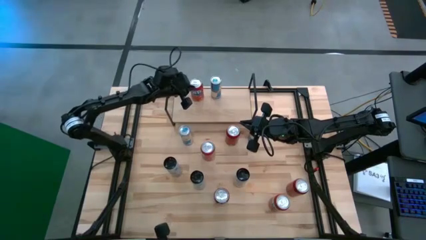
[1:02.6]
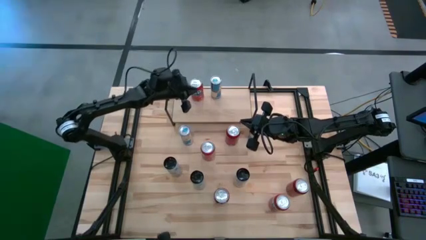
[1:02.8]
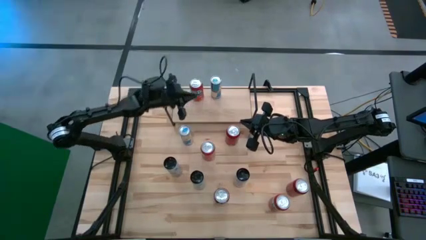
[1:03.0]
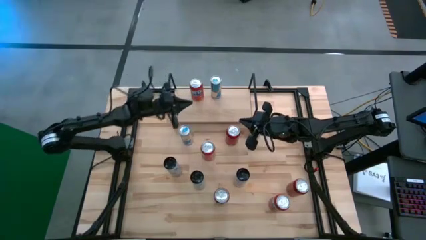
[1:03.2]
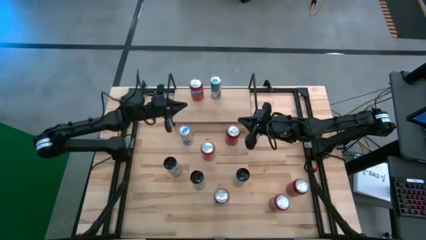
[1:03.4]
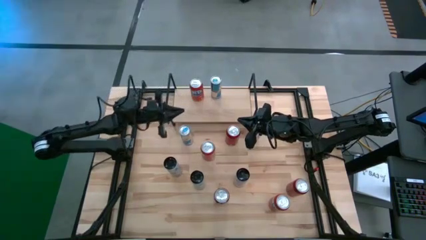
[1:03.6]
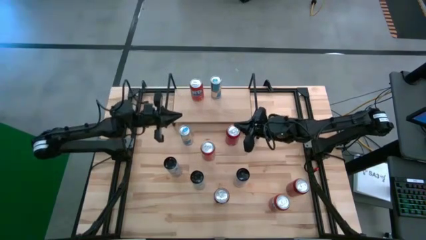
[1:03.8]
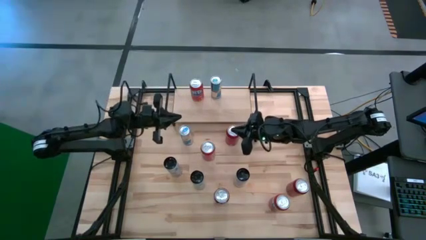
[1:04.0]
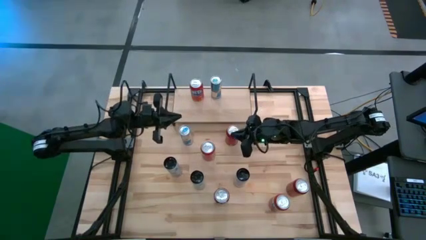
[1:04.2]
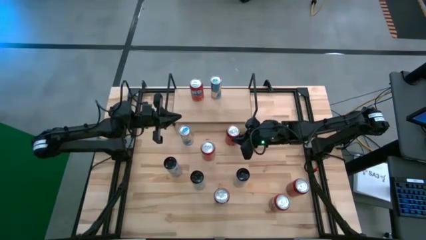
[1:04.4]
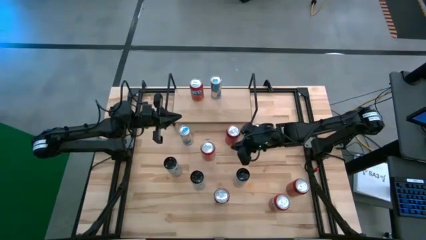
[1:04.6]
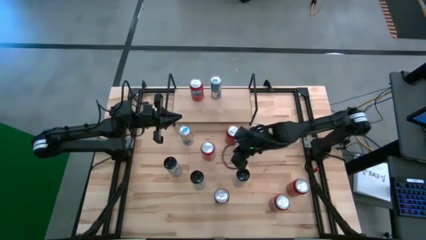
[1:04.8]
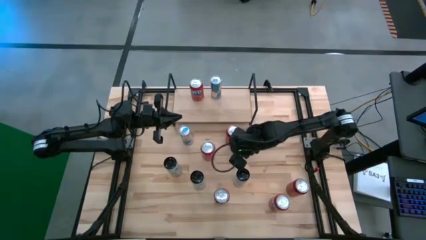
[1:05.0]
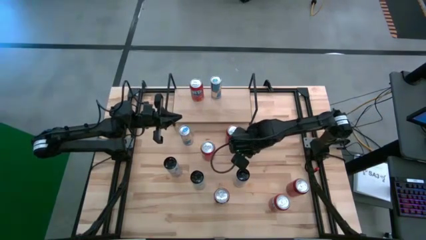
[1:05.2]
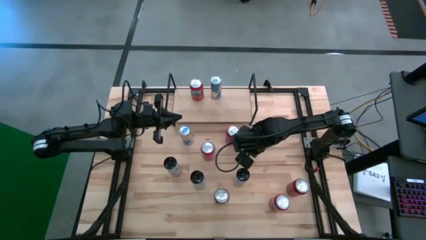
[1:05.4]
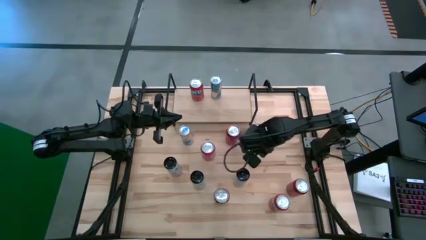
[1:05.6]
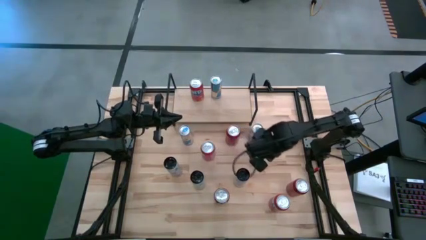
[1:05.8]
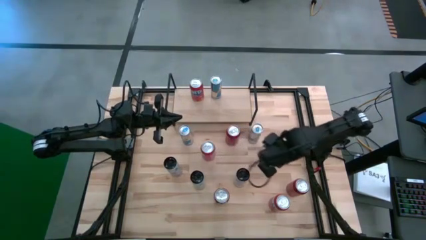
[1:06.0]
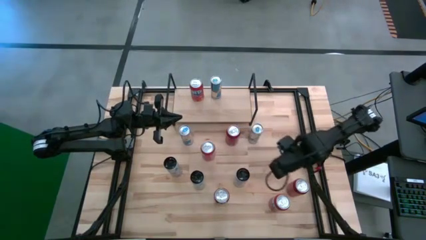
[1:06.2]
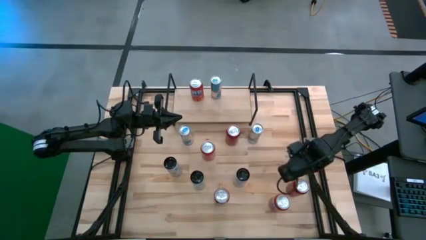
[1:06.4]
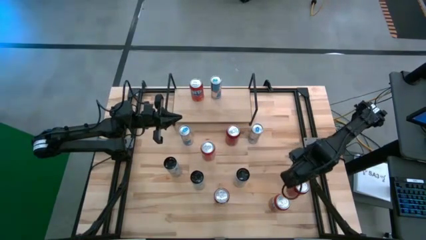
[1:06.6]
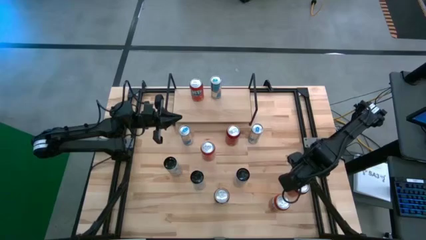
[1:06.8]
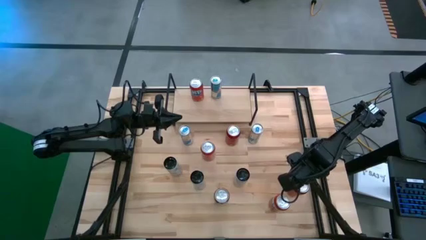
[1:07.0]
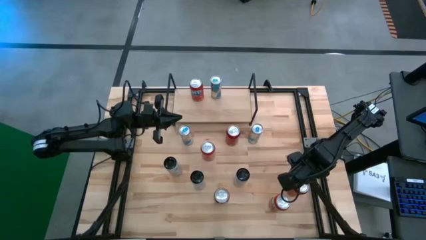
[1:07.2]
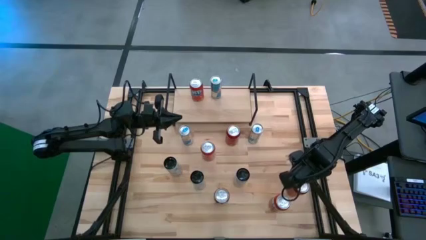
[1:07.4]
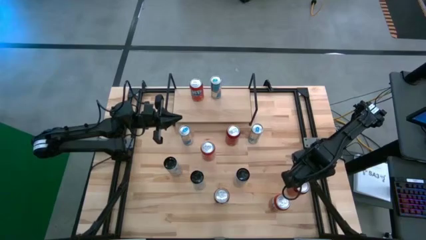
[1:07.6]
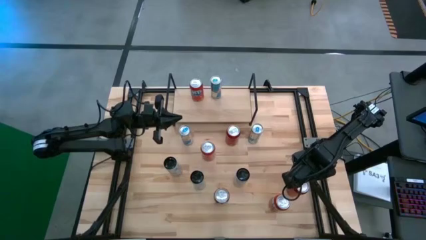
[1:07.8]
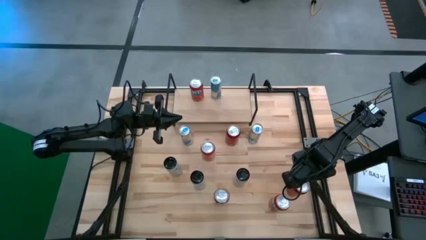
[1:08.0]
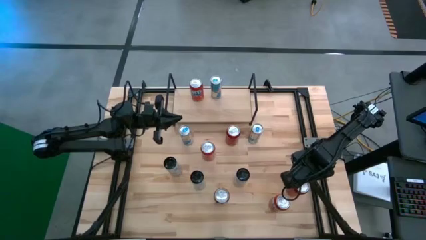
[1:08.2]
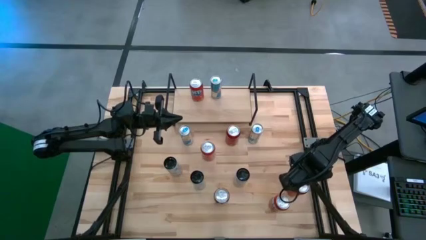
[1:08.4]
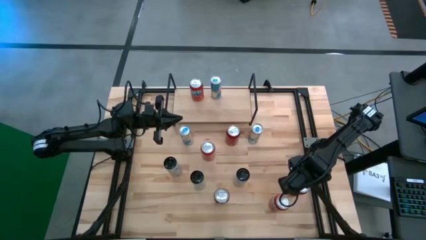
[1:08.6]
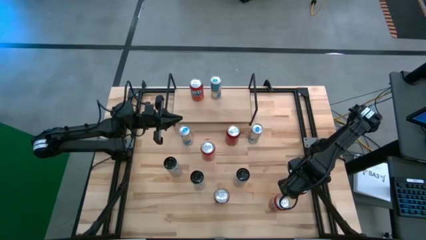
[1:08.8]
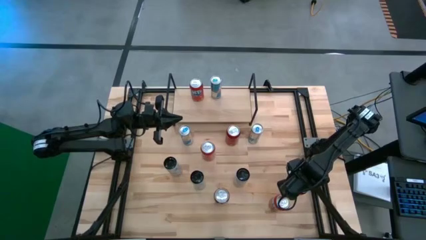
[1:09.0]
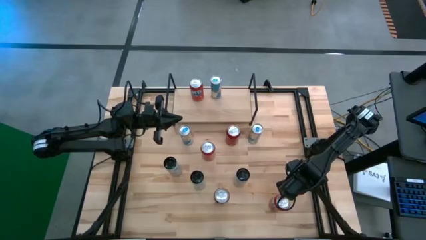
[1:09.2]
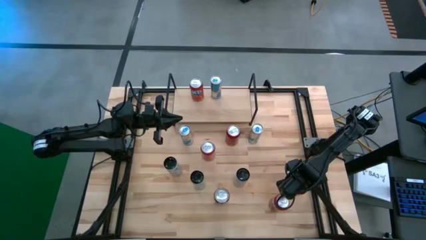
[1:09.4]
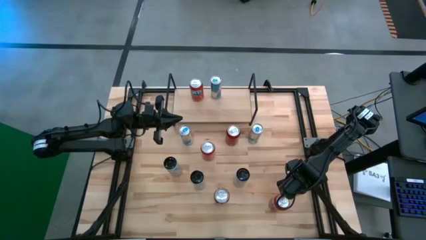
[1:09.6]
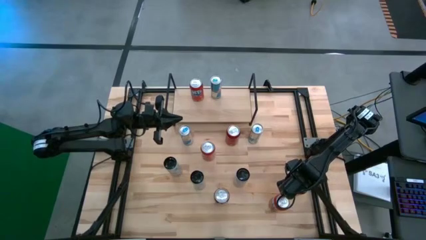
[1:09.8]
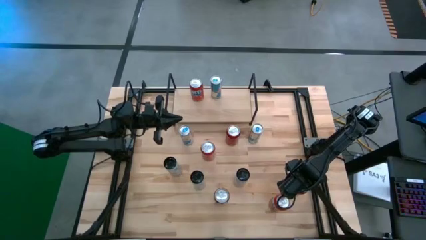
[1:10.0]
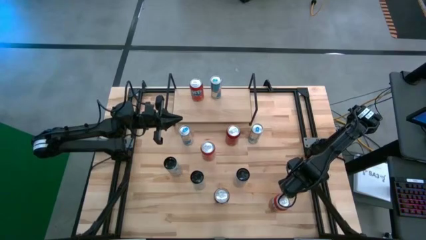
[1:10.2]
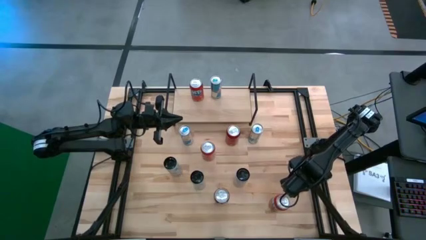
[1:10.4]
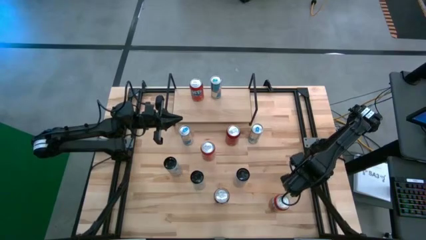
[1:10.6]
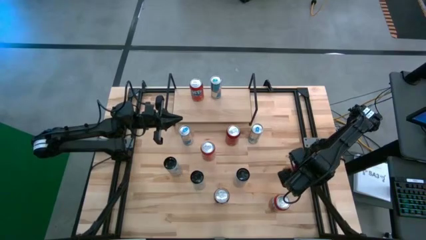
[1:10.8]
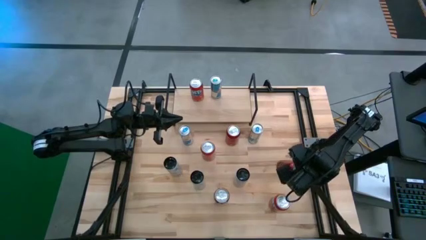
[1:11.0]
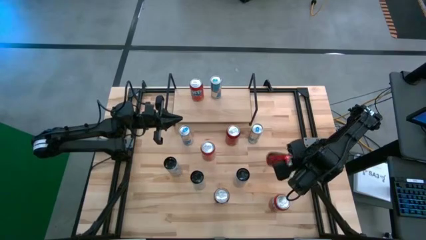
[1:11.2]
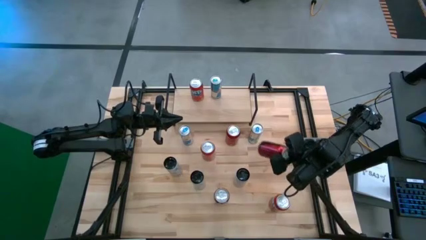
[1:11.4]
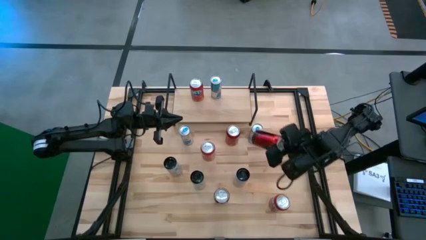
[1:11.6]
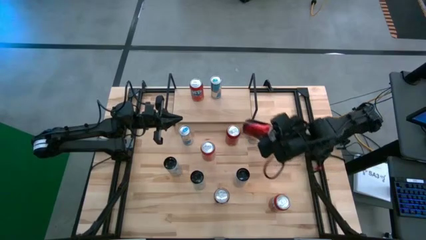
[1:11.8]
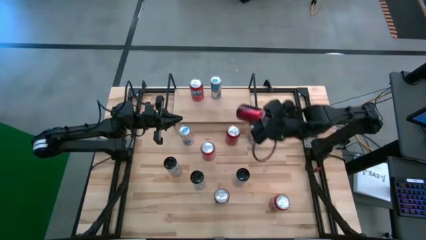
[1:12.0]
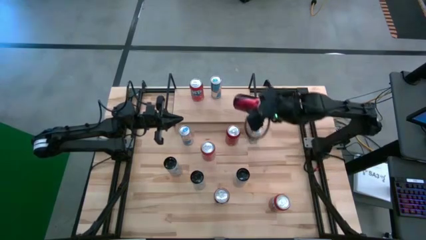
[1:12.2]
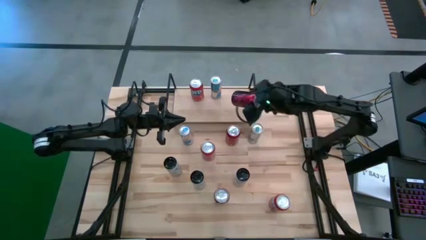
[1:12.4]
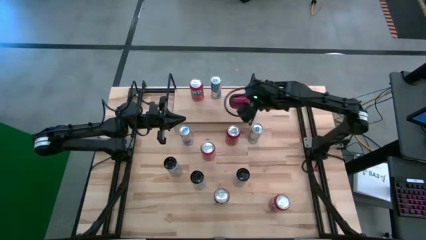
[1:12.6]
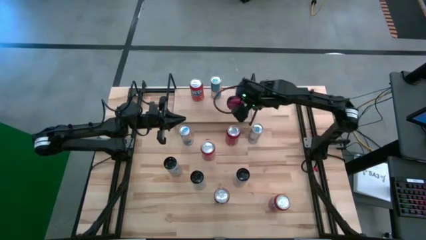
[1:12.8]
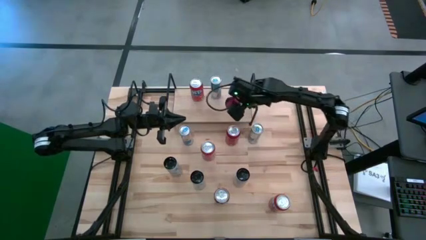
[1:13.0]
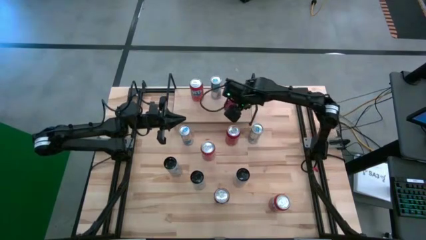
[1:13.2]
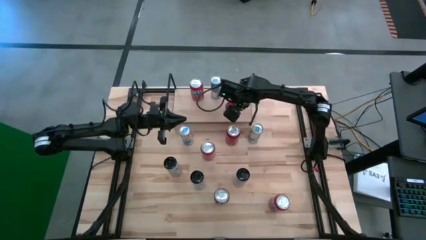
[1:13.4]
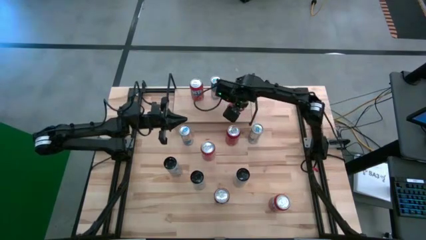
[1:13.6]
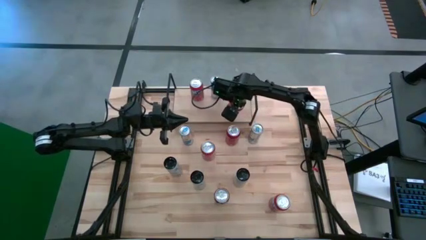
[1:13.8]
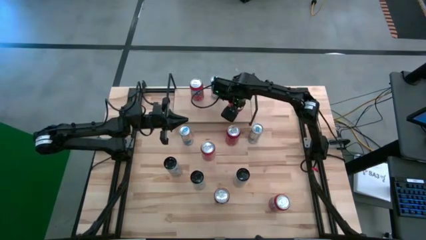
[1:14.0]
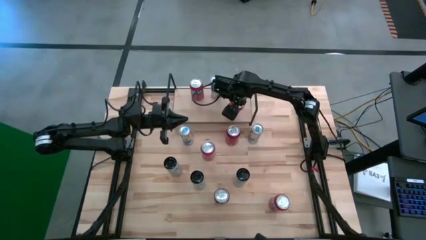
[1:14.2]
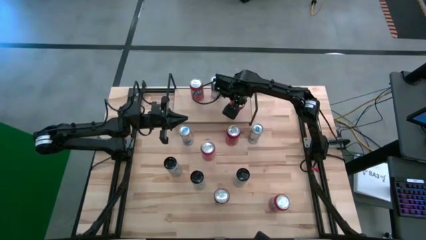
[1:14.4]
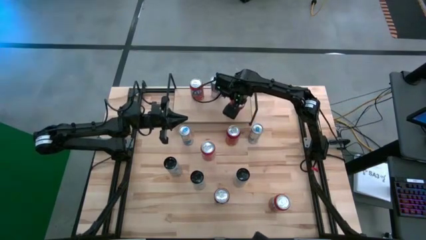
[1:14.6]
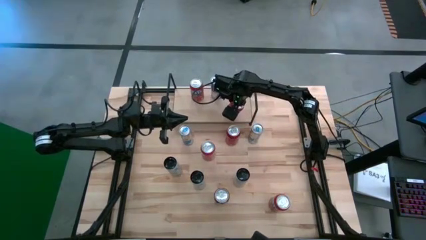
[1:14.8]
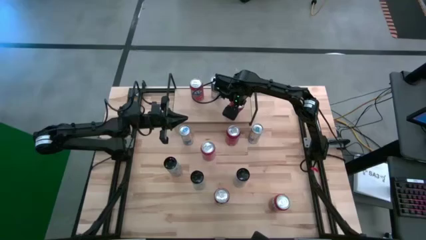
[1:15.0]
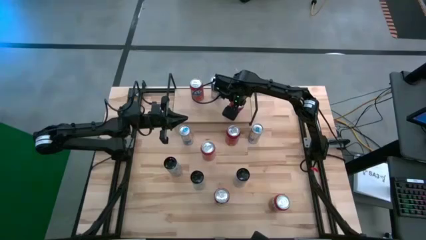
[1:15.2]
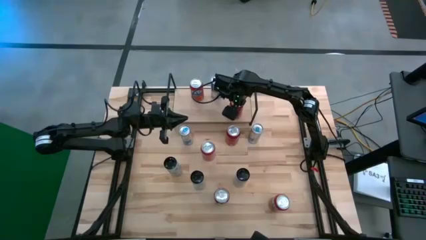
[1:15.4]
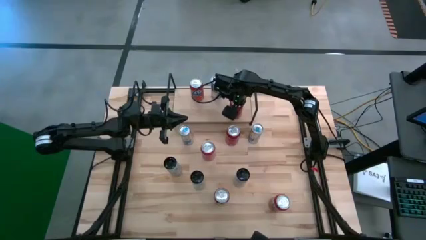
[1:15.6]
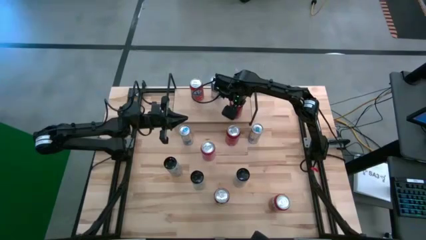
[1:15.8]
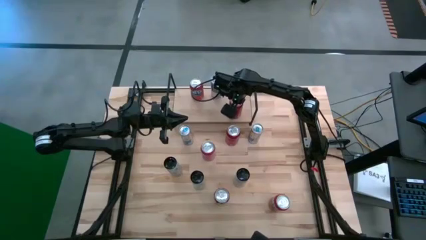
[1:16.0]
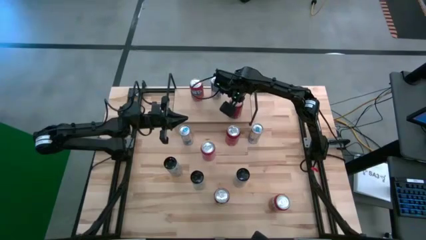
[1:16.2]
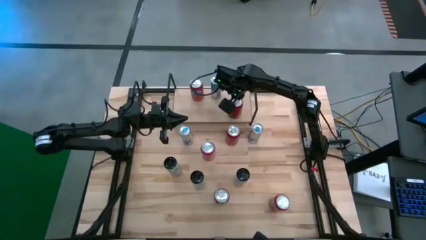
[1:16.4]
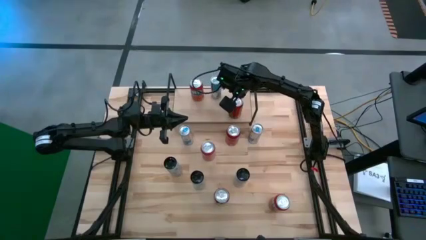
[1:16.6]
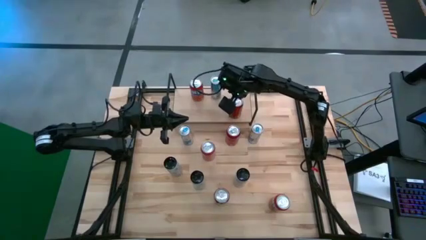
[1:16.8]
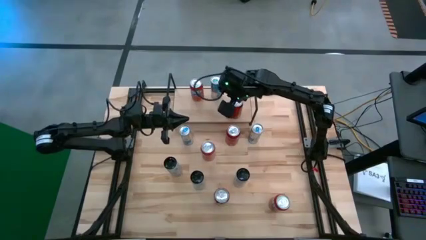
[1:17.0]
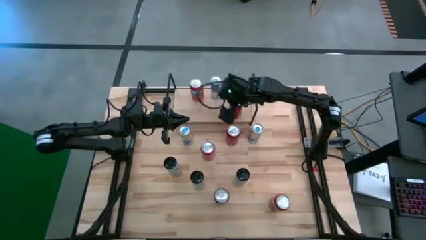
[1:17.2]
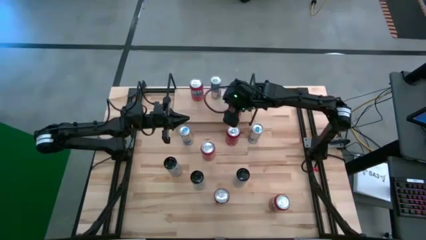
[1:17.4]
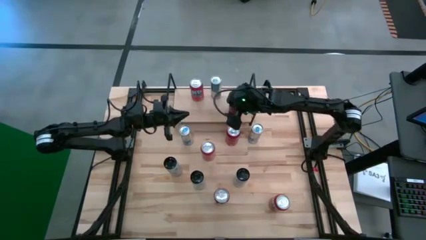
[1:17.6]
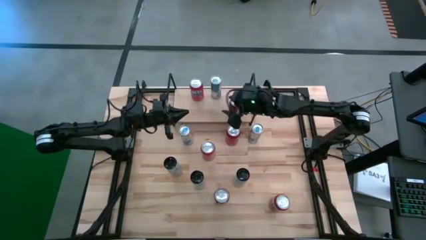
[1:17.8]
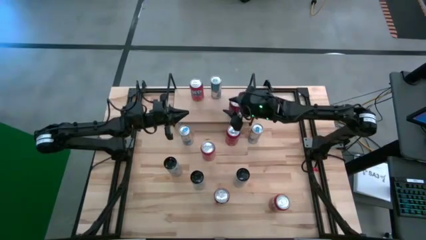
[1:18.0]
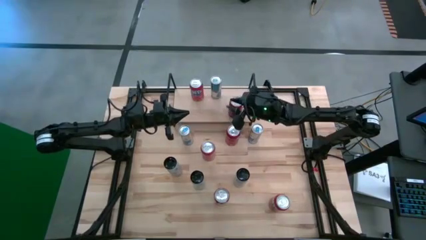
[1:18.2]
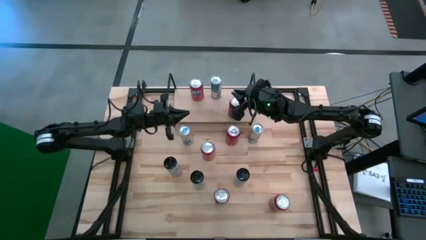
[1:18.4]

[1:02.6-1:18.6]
Task: Place canned beverage on shelf
Put the bottom right red soda can on the shelf
